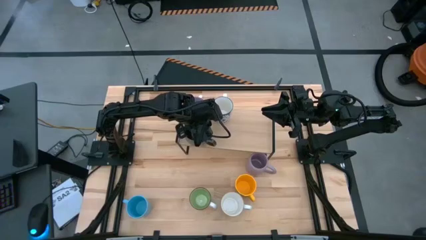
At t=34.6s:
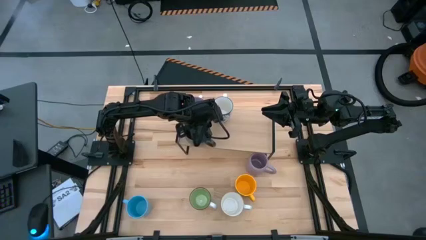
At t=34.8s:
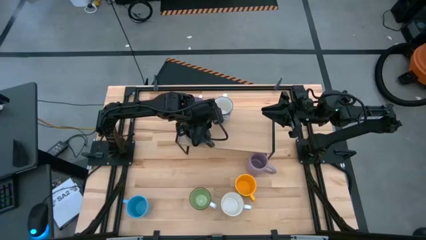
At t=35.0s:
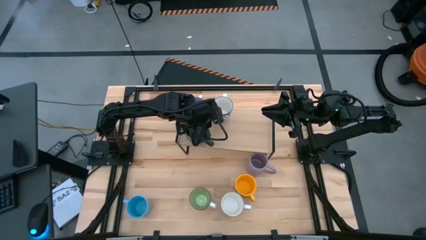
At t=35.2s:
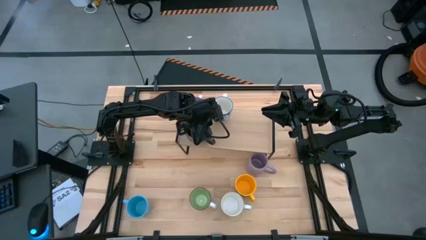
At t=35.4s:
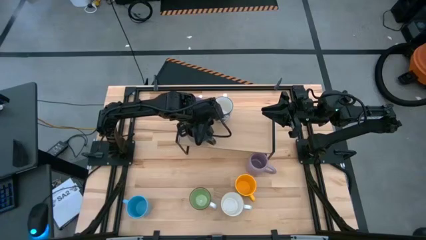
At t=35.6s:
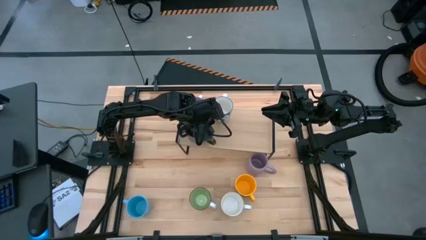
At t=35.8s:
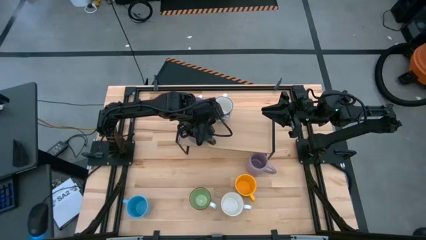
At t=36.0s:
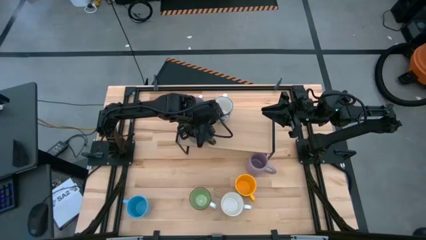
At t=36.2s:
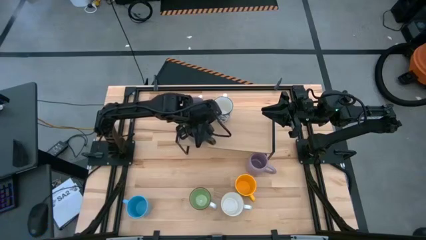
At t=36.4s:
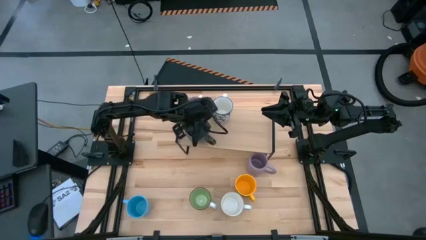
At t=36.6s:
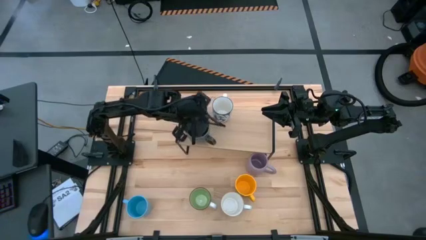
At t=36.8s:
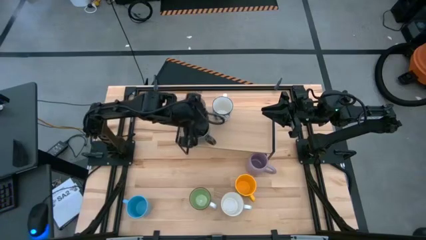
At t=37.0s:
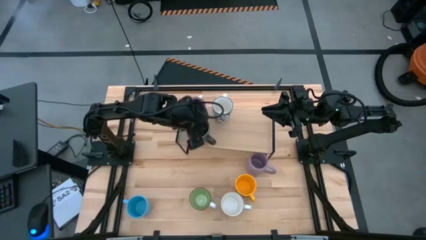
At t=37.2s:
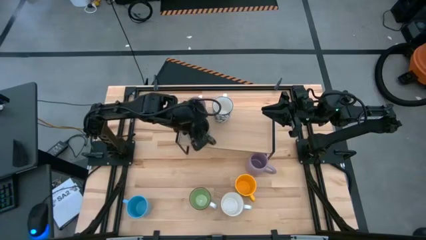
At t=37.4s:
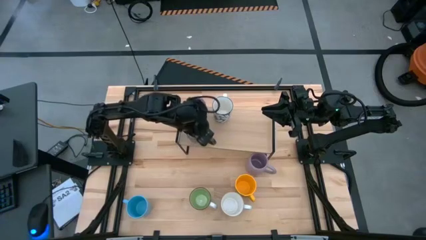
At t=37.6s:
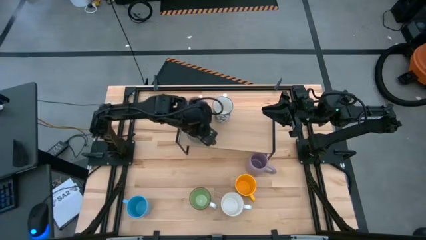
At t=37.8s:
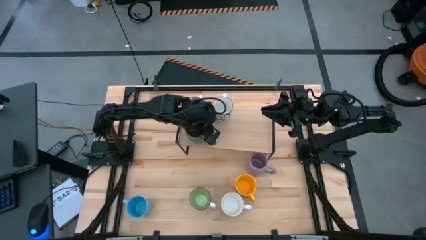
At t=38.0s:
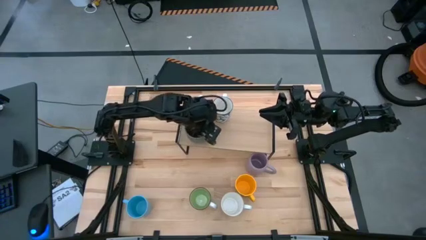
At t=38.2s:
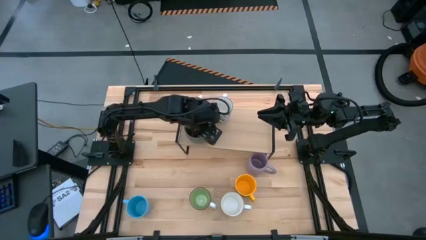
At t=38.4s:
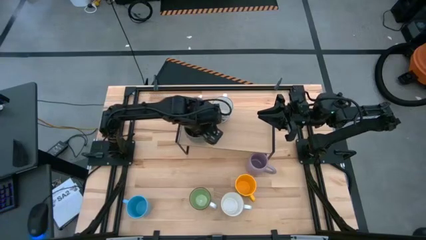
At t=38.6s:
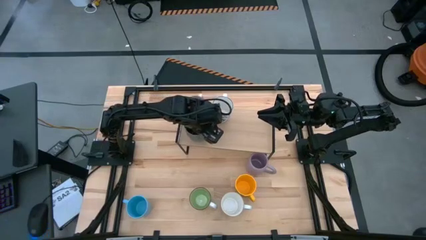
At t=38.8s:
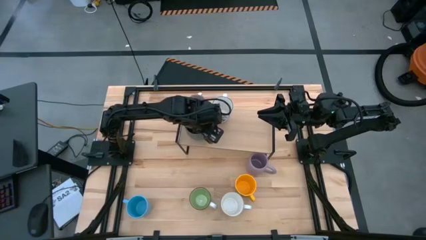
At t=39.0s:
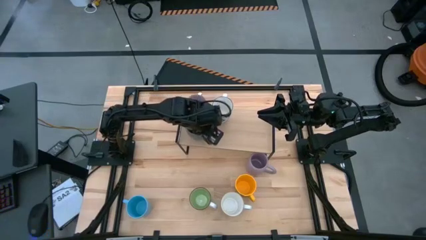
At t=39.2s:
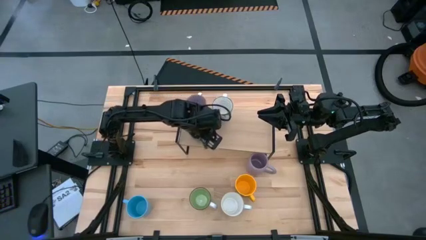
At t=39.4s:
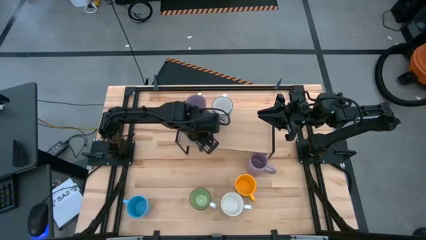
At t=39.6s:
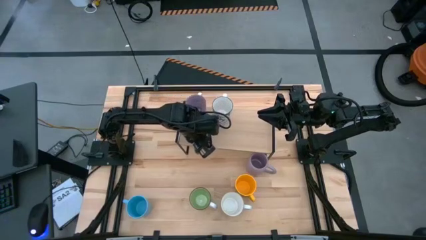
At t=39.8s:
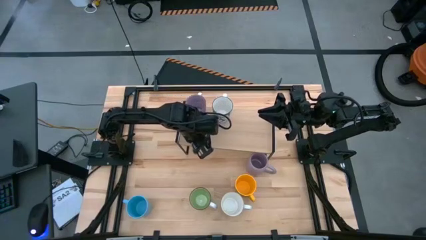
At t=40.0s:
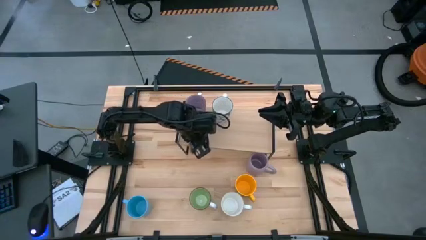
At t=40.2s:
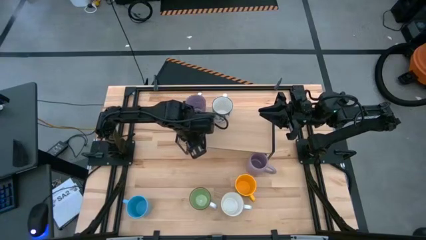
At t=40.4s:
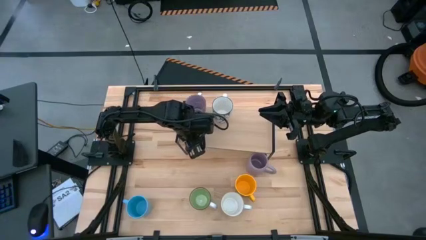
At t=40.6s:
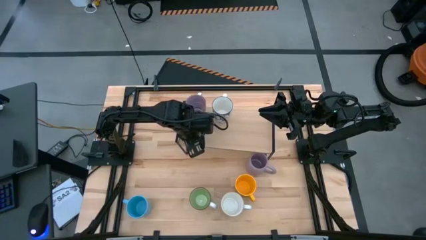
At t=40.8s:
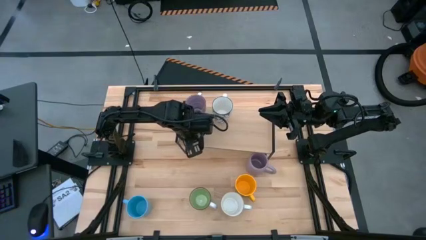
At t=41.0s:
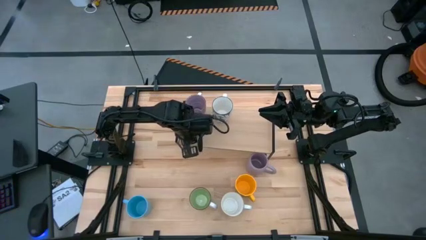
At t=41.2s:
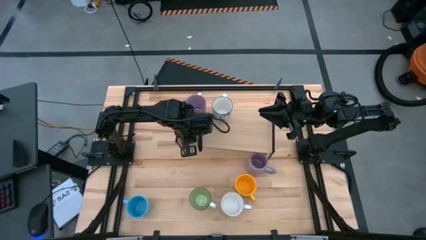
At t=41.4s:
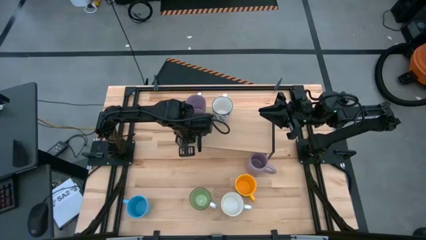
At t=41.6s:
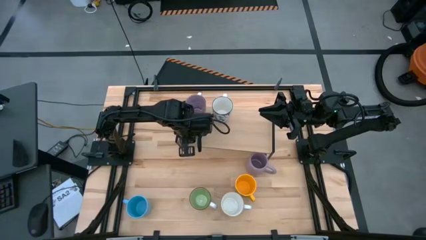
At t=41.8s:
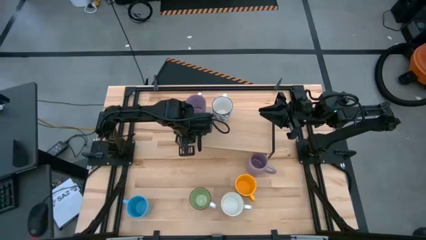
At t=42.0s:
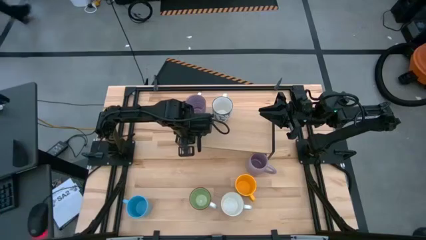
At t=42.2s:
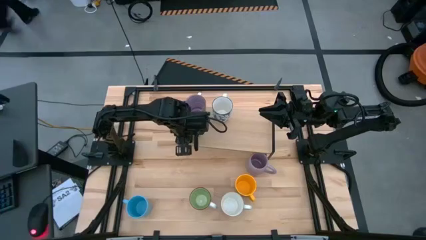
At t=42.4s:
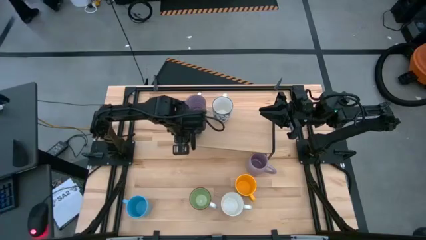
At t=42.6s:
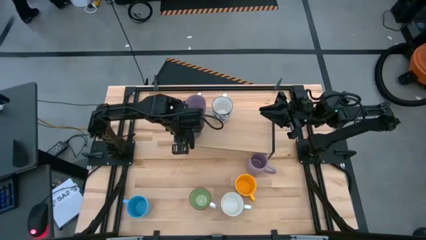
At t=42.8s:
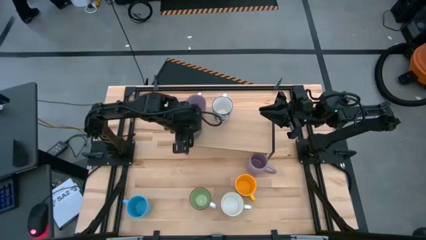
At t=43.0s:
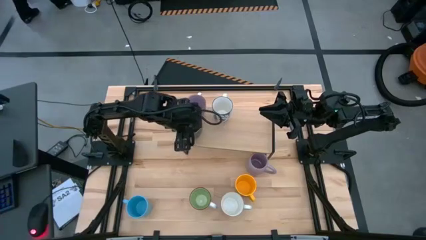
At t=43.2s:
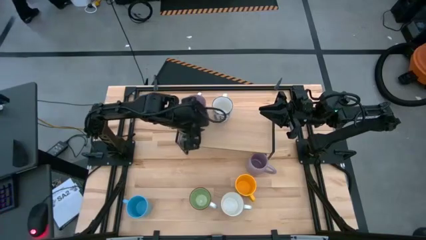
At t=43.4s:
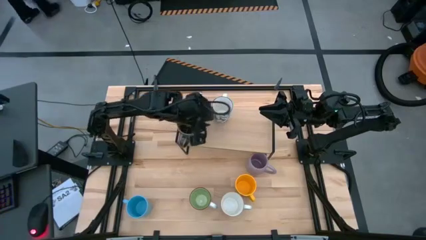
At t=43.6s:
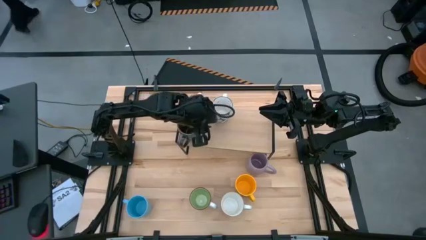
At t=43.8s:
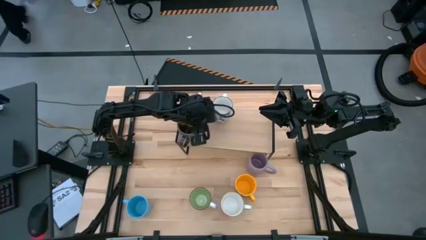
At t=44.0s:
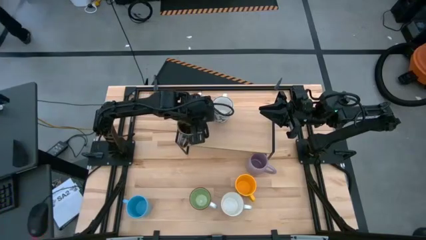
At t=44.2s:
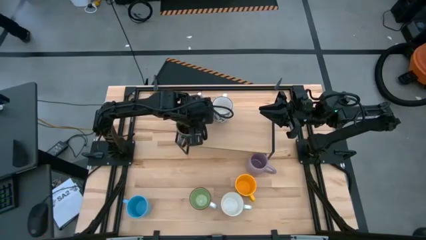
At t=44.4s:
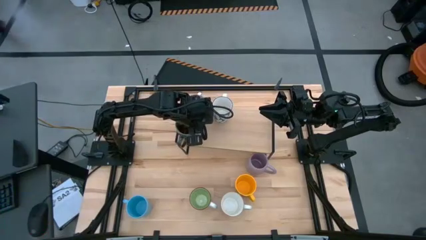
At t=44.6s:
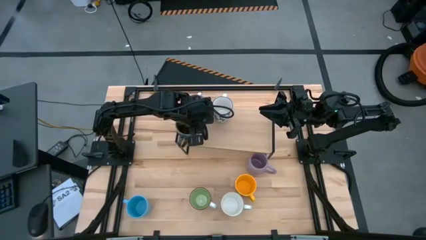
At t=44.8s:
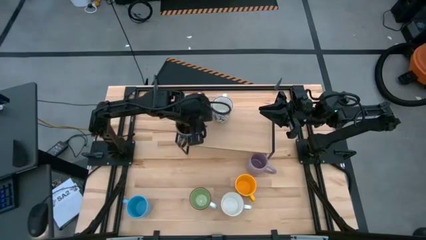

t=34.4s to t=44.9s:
Task: Place coffee mugs
Put the green and brown mug on the shelf

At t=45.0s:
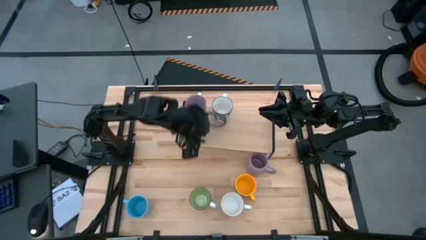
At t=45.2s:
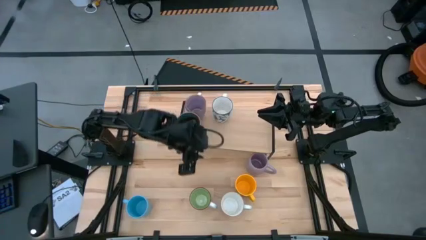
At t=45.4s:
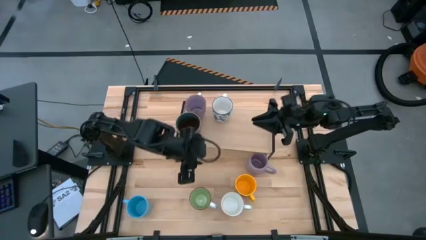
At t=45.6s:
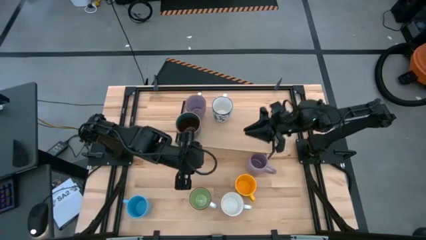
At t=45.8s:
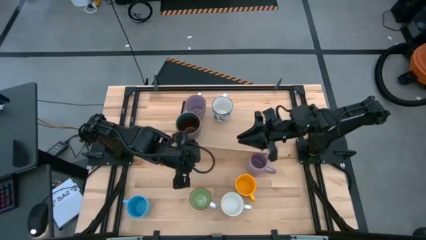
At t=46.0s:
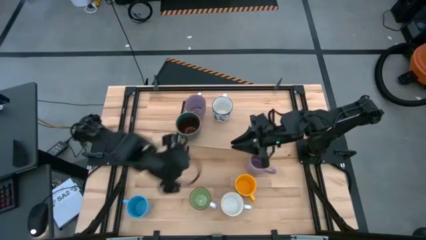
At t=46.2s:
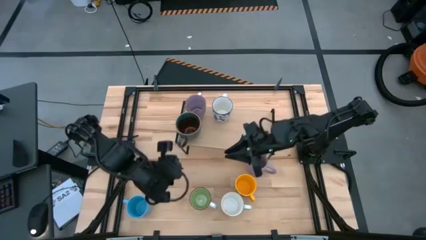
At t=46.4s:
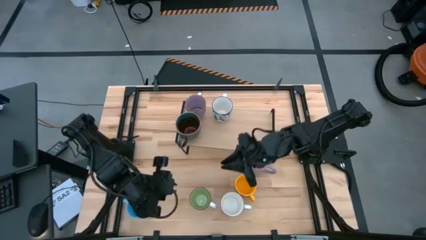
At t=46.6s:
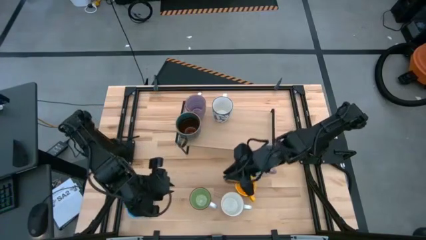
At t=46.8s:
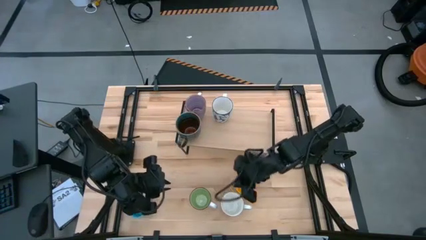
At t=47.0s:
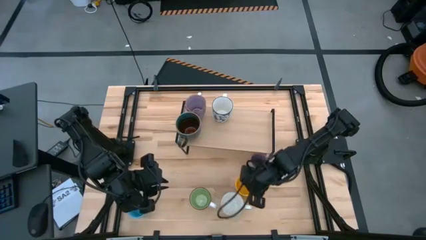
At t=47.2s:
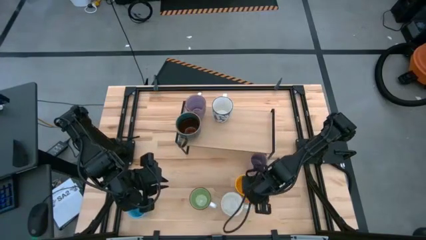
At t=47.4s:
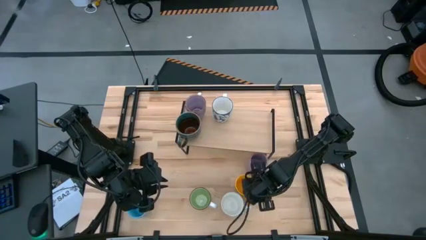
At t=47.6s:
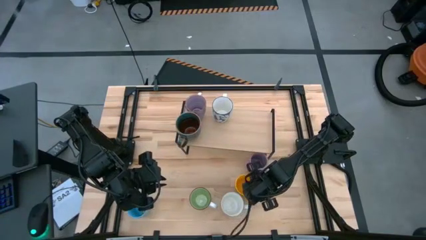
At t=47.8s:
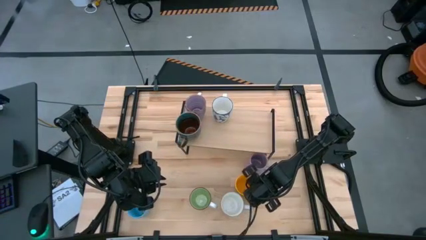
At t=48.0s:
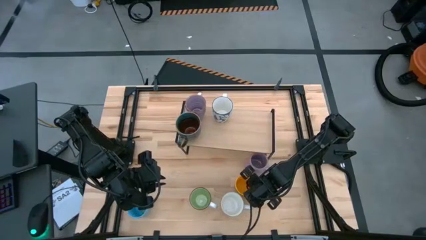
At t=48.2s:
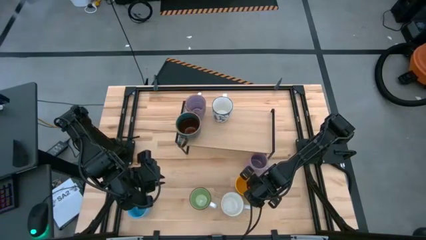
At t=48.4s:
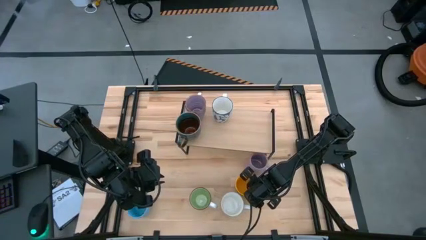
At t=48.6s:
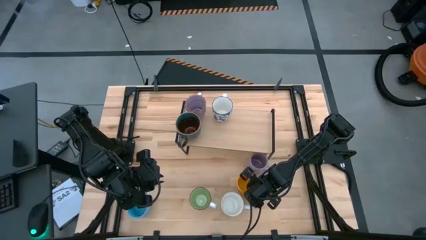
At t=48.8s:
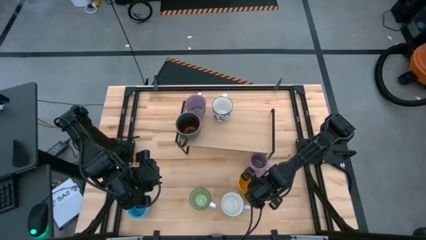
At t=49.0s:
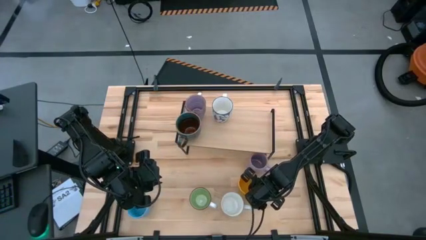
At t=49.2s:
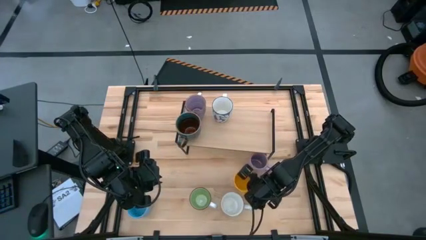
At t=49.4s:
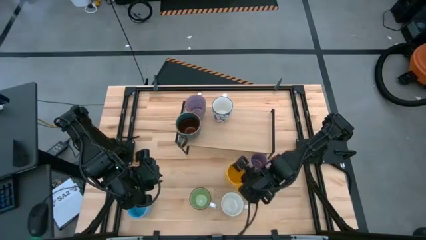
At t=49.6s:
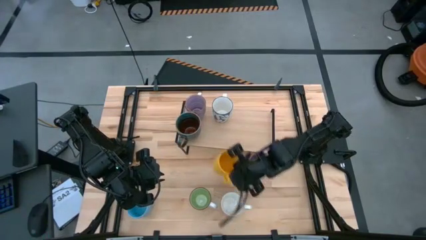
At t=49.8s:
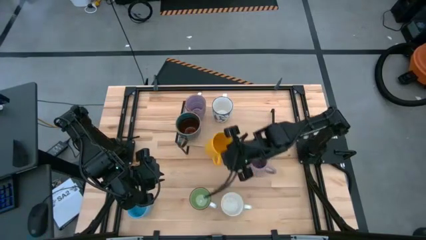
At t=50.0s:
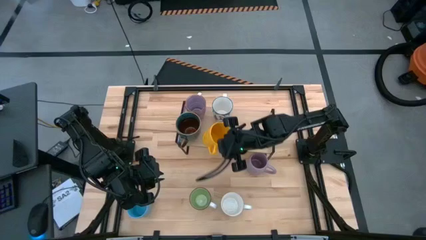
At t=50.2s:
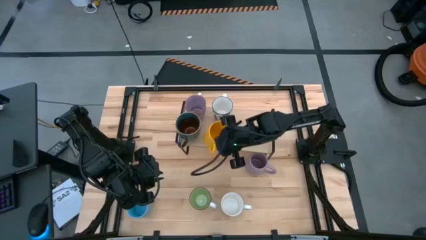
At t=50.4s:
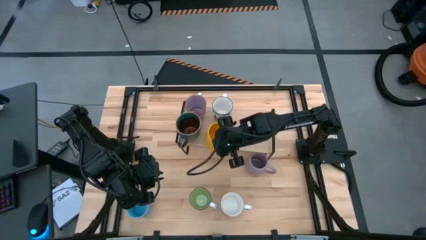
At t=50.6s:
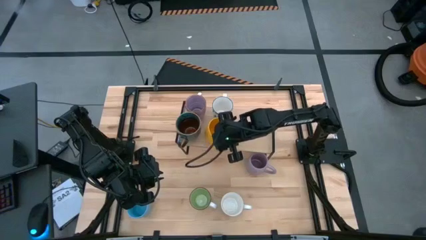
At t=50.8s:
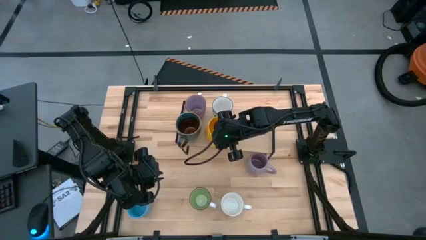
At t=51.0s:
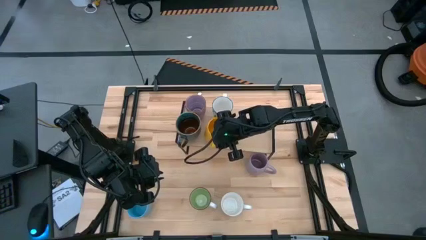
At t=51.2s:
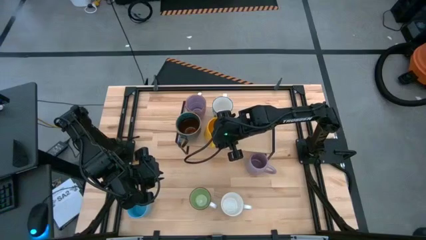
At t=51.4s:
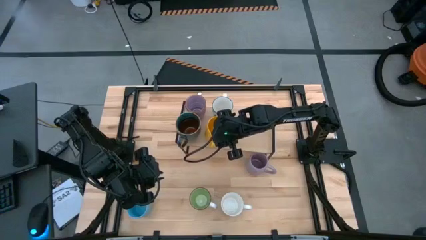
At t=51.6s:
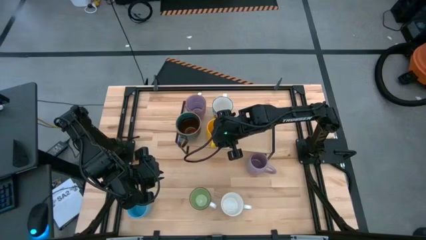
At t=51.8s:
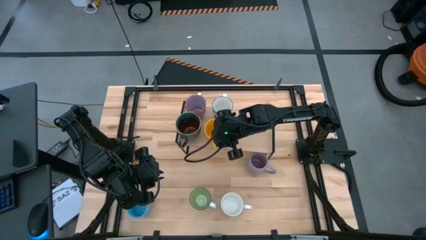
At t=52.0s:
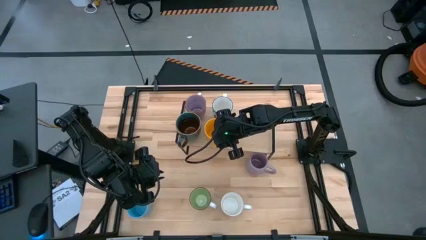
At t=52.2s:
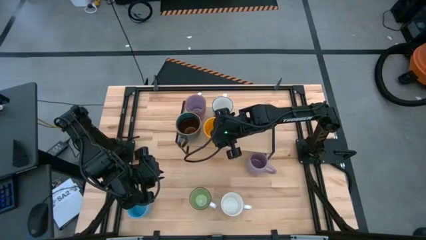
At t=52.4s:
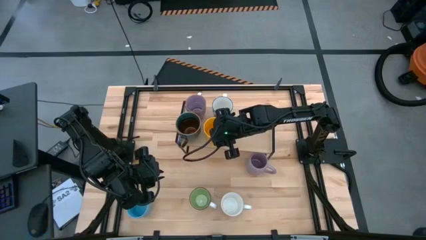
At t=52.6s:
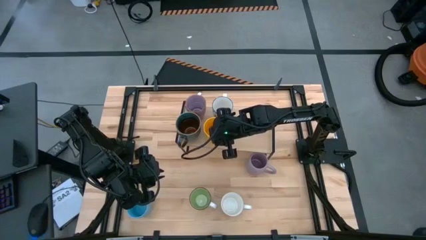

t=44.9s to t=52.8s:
Put the yellow mug on the shelf
